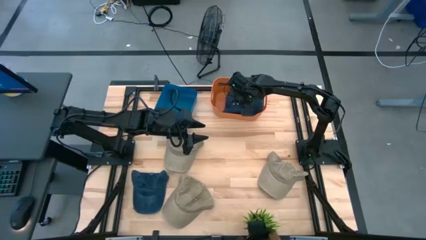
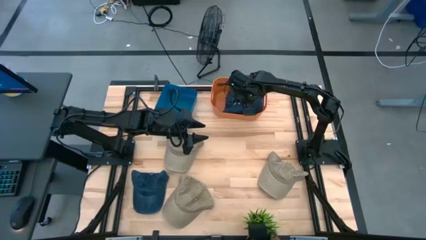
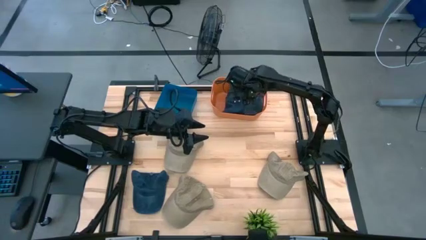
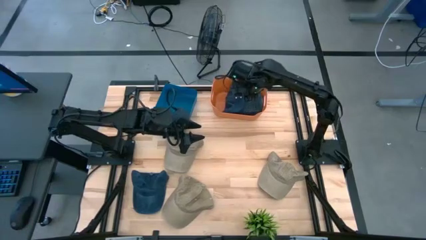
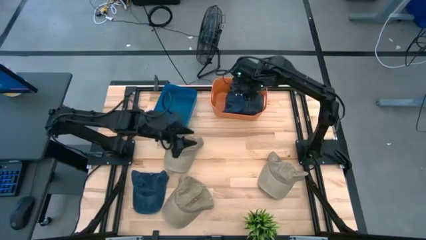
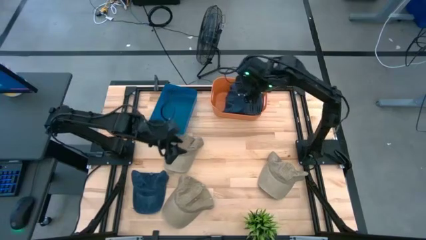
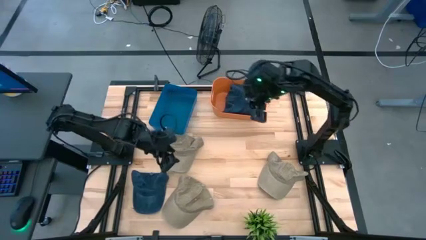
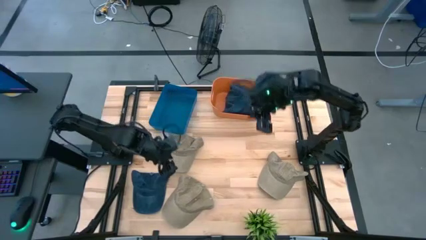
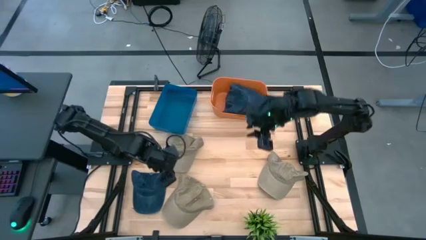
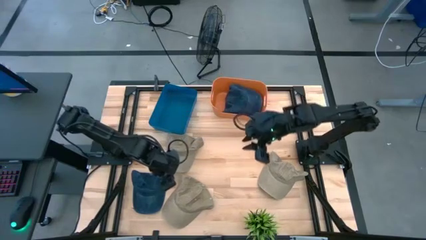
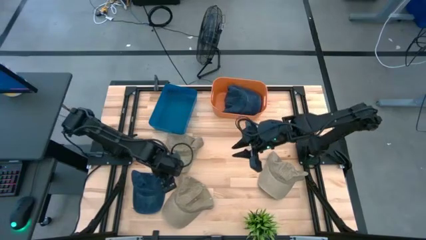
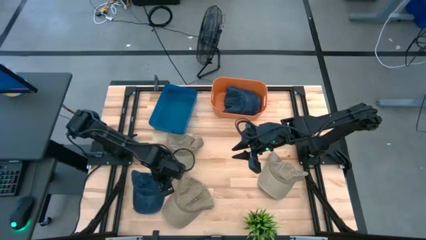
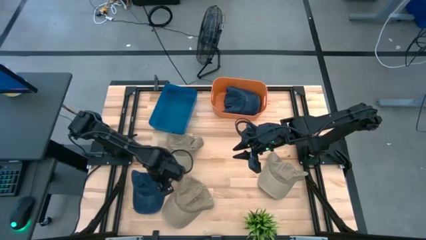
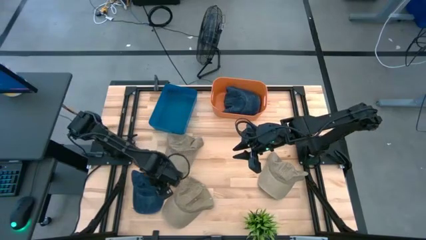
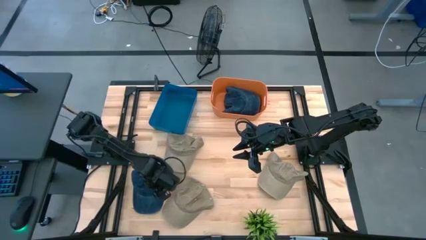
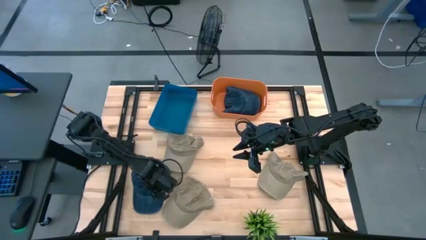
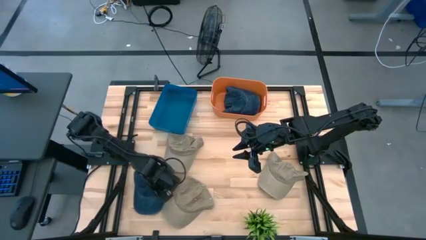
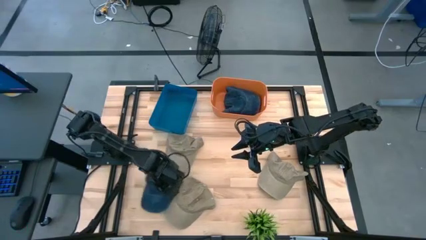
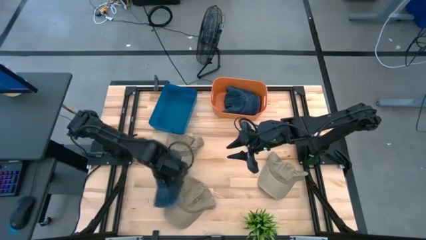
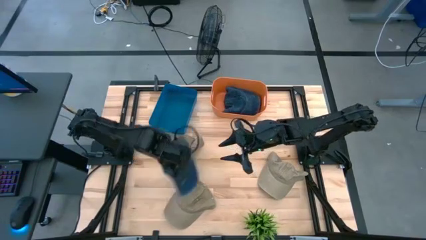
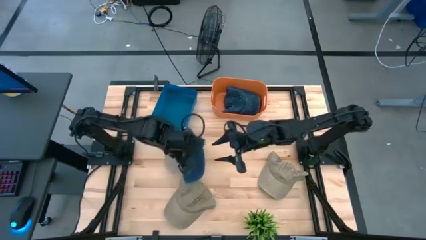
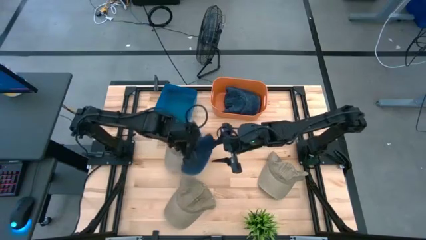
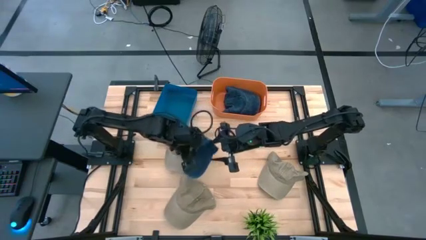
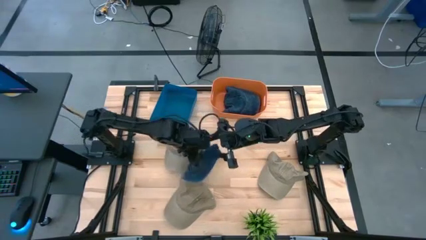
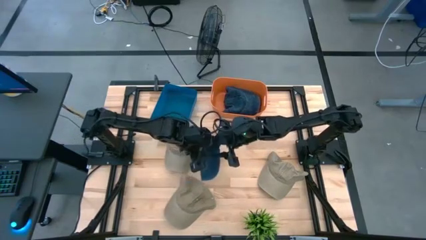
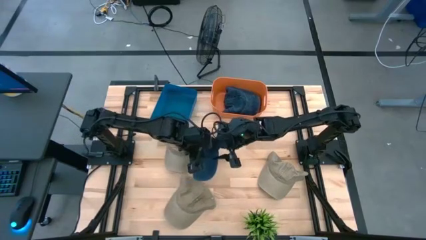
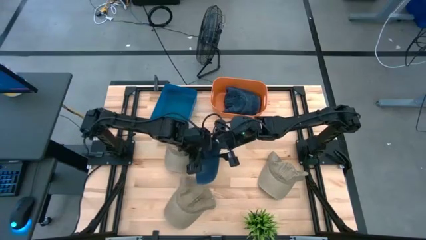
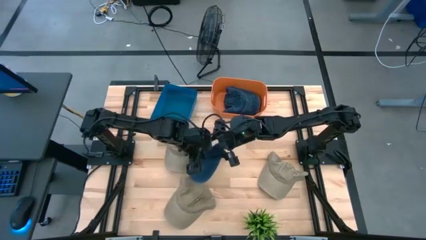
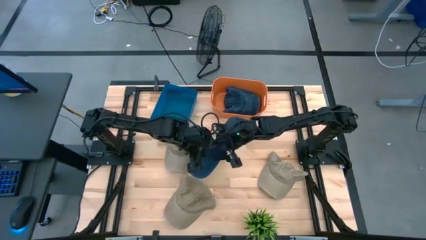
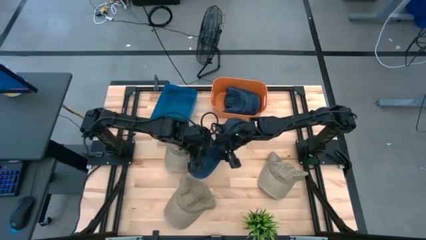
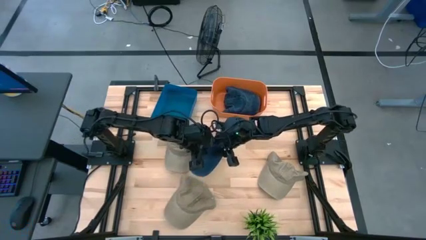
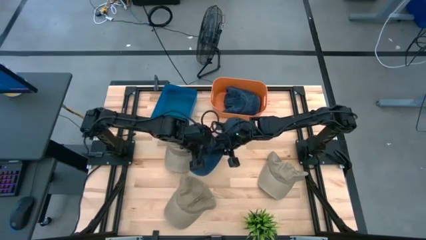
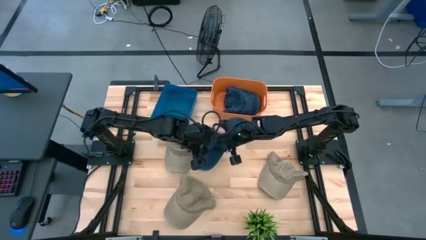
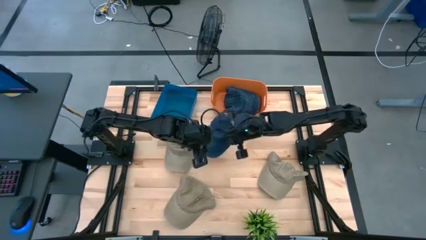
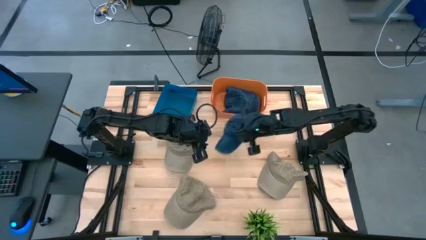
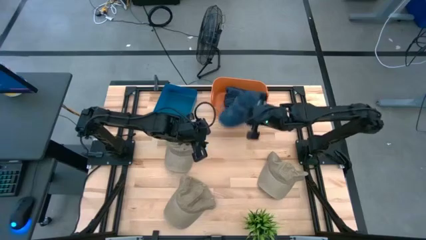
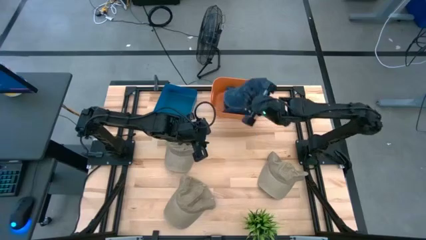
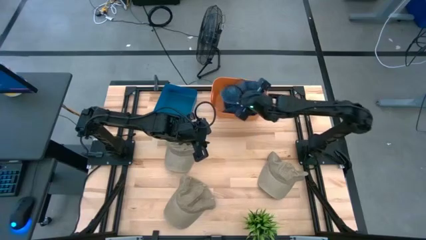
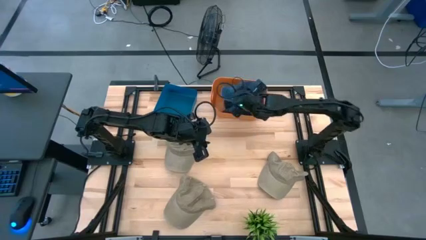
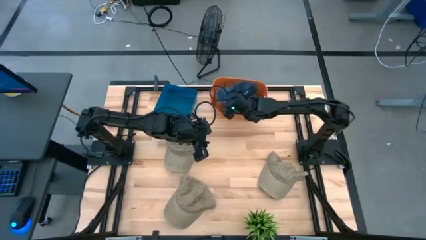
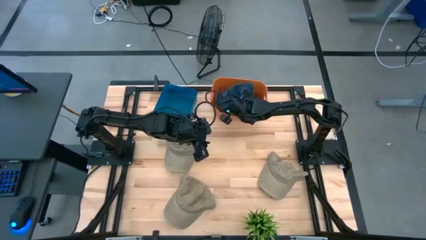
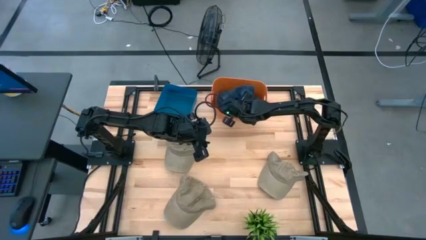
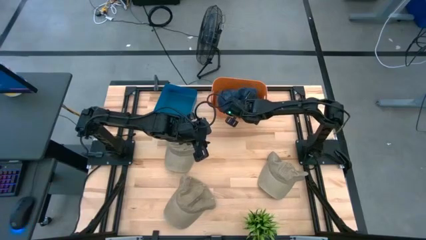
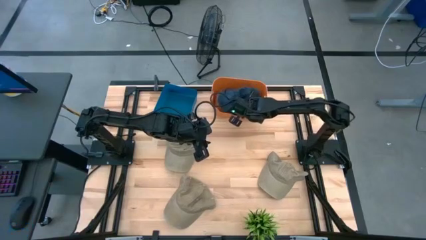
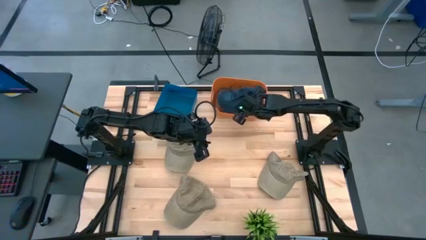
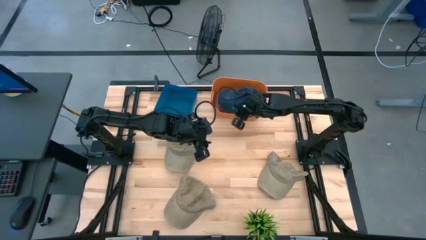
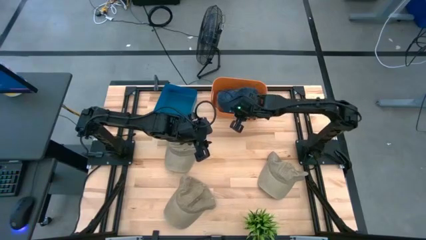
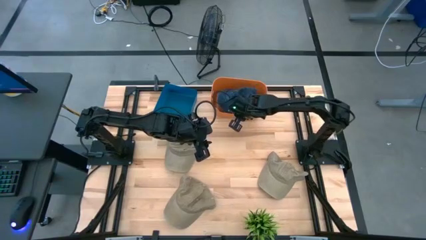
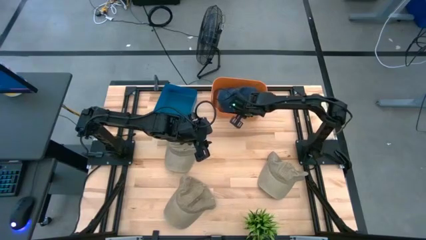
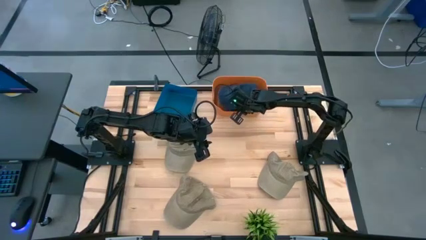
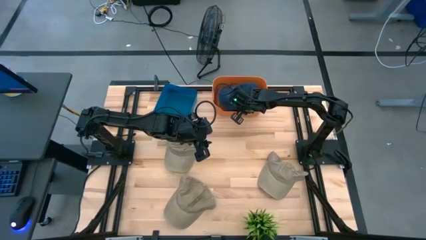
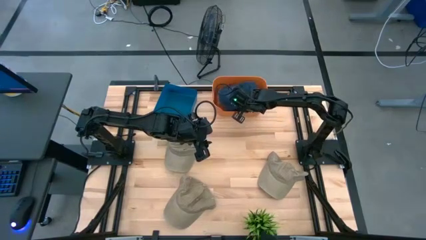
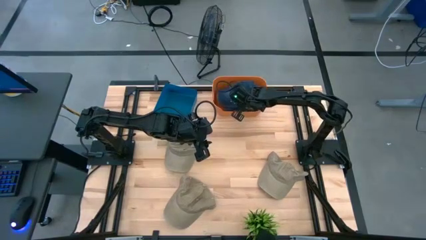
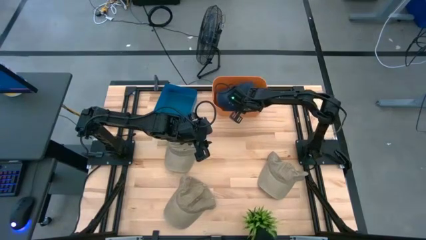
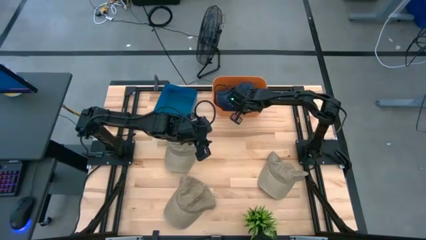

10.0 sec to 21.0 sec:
Task: Pick & Place hat
Put the blue cap into the orange bin

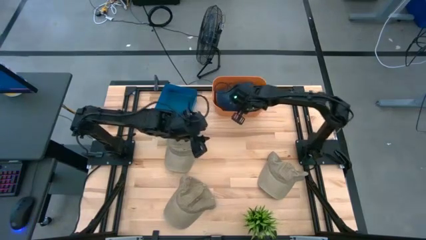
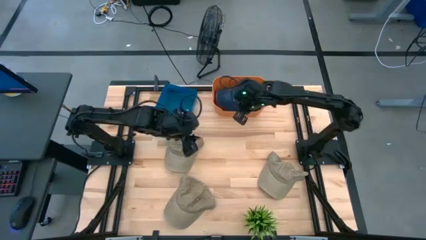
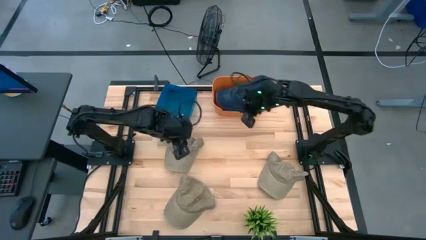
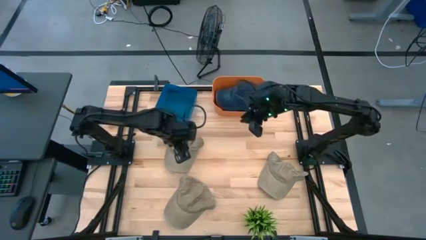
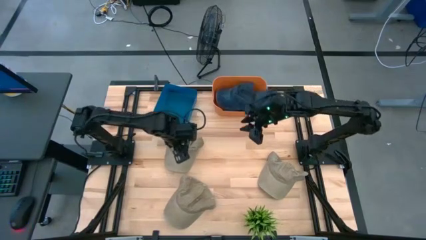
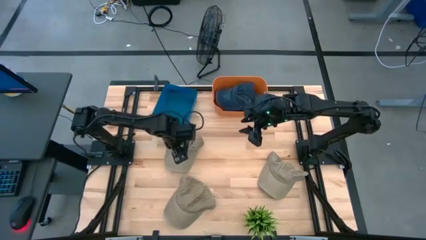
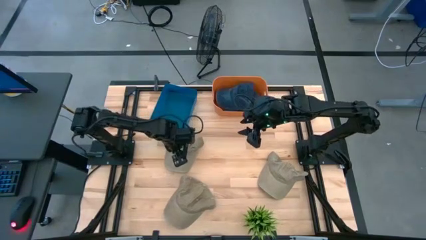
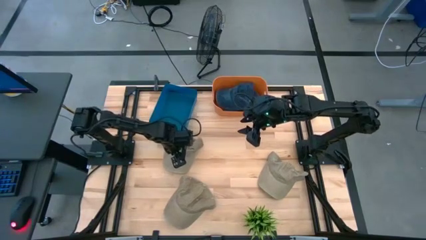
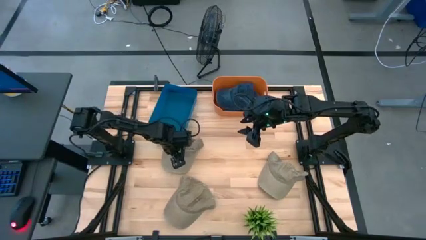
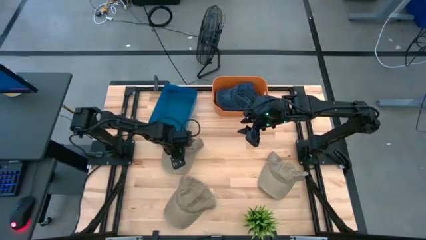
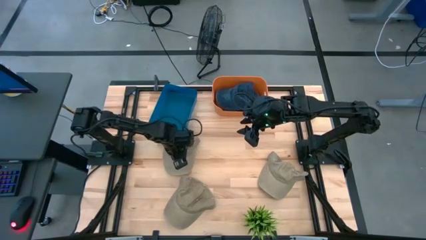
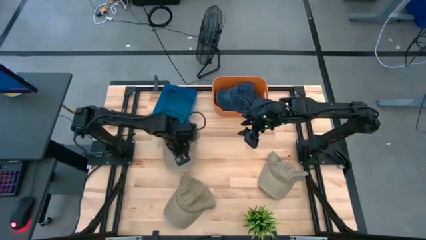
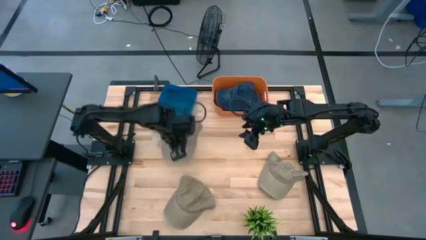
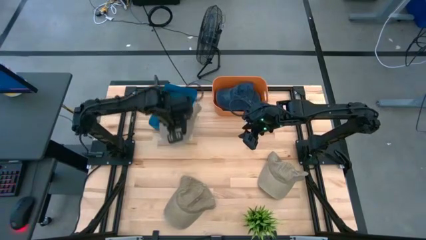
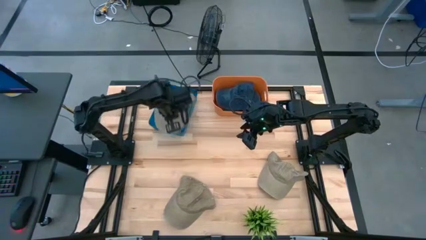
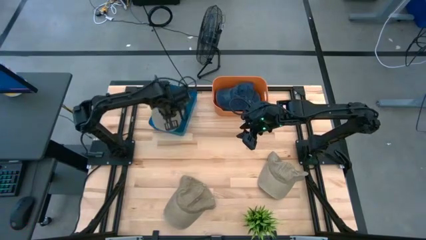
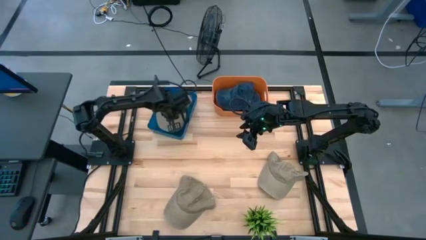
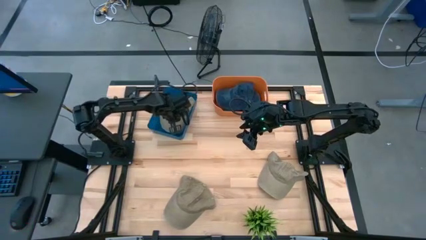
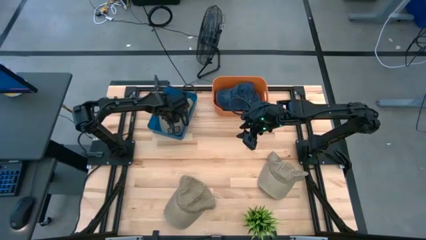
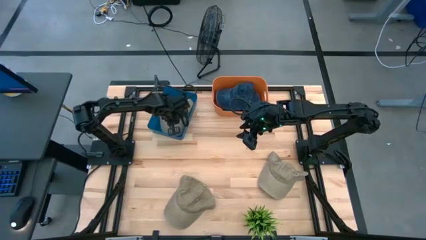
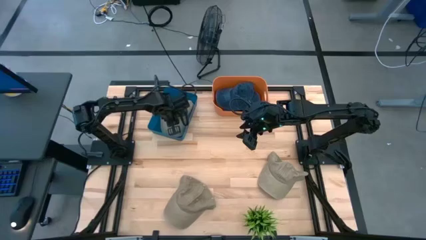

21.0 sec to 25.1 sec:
Put the top left brown cap into the blue bin
